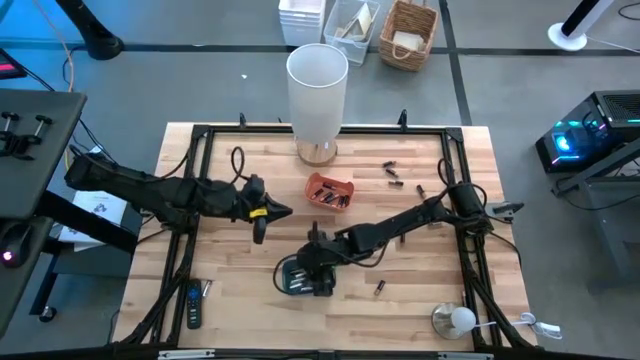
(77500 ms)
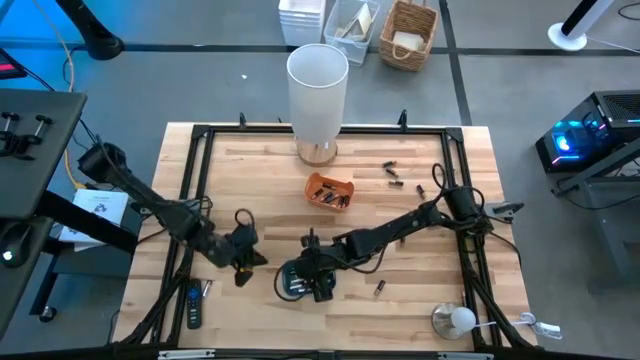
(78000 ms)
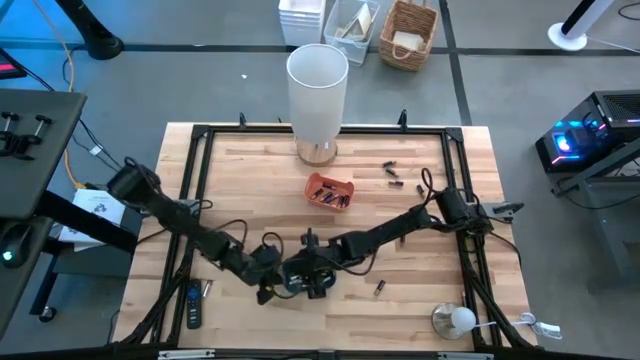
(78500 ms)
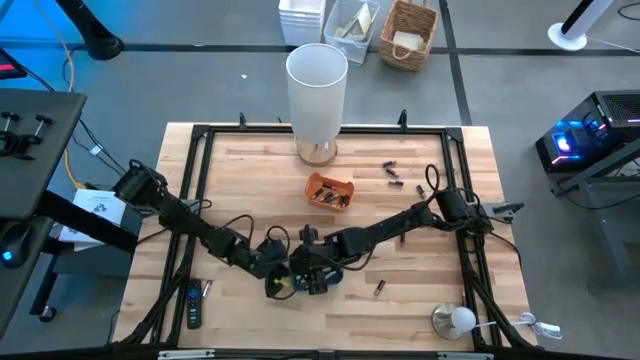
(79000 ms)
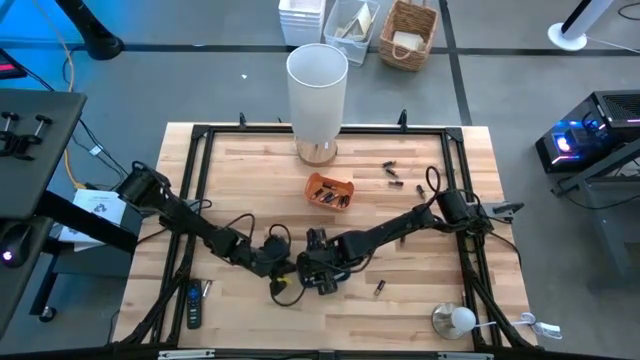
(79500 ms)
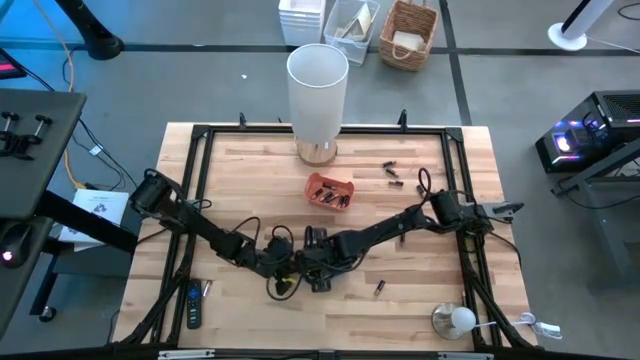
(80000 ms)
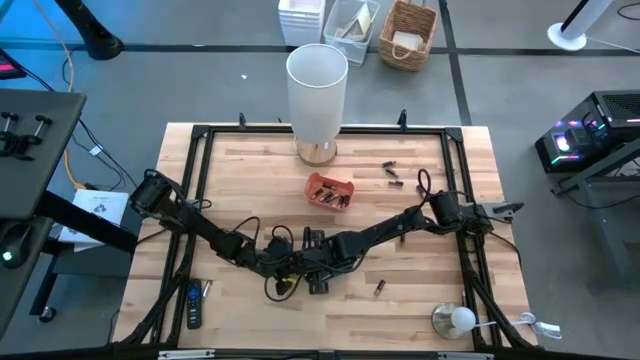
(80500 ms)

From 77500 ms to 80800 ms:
Task: Sort batteries
Remove the black battery from the blue bin

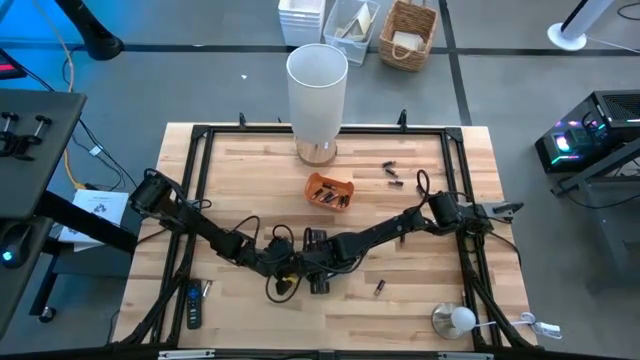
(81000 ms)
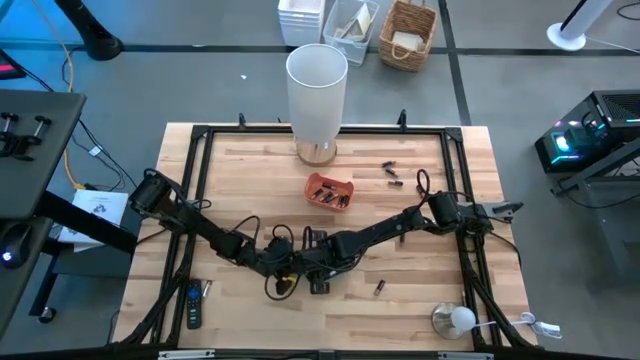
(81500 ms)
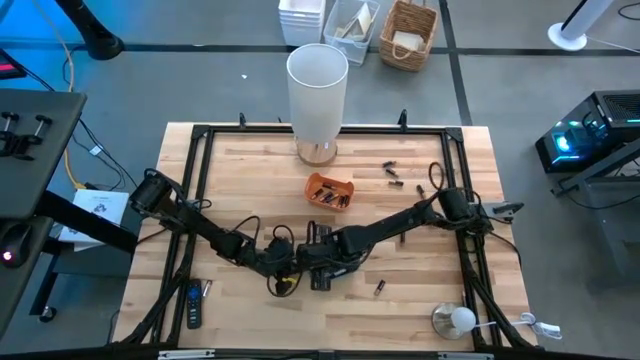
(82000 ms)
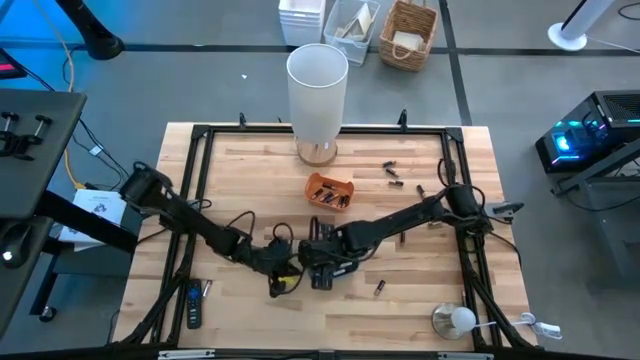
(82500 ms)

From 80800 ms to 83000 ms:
Remove the black battery from the blue bin

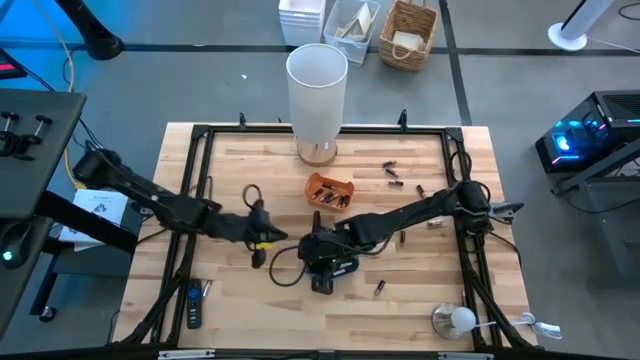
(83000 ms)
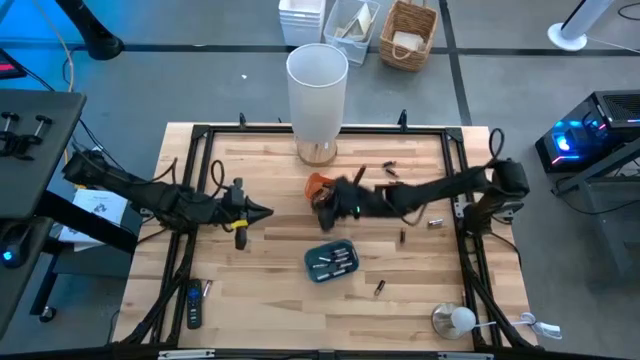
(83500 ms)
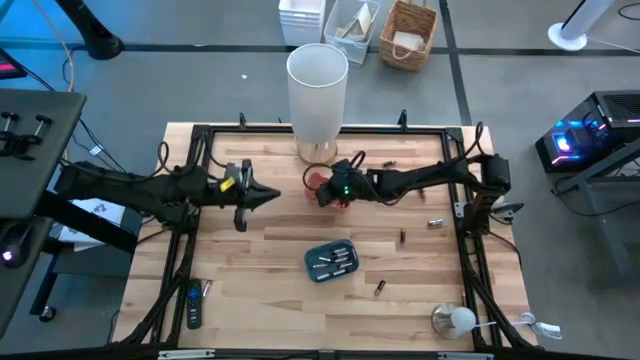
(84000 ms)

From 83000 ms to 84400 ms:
Put the black battery into the orange bin

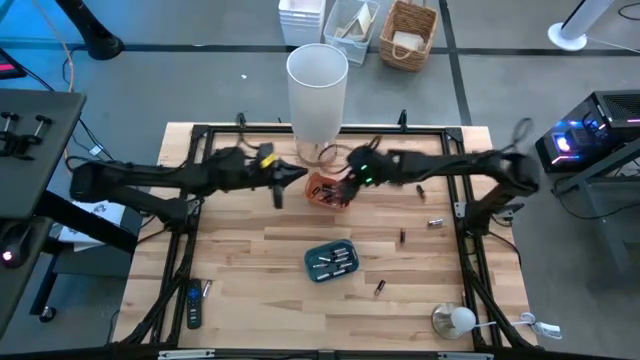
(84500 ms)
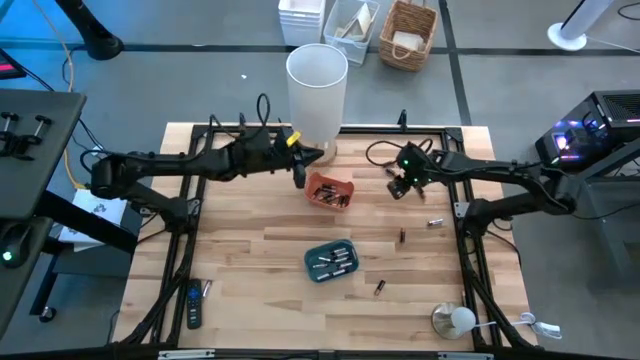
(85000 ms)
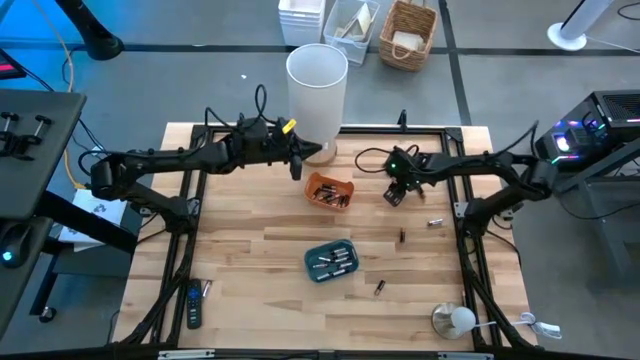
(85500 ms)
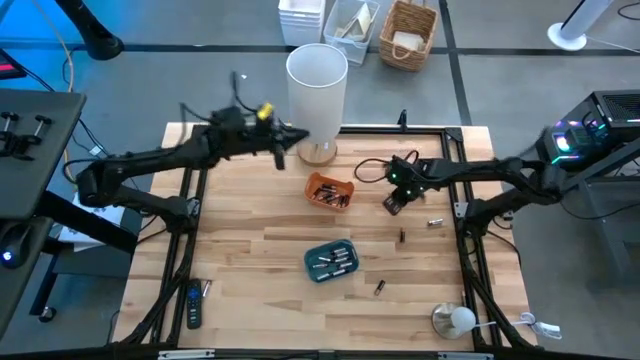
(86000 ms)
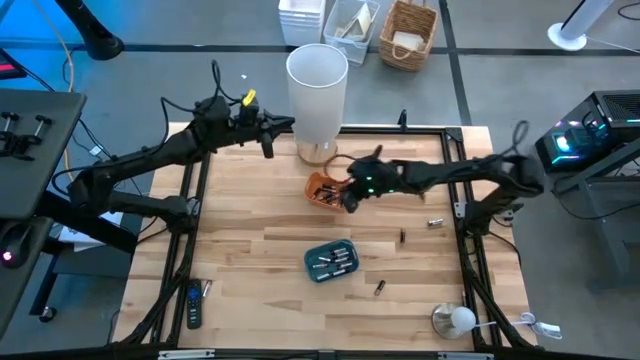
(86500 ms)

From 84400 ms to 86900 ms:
Put the black battery into the orange bin

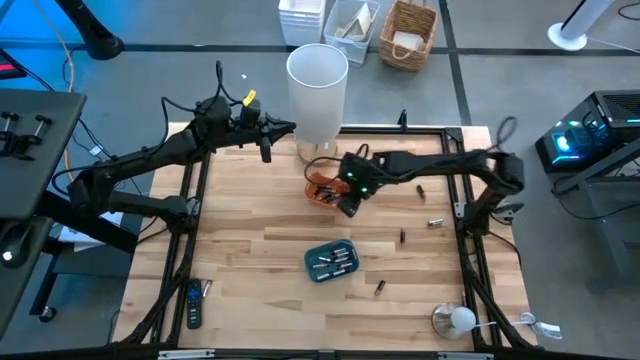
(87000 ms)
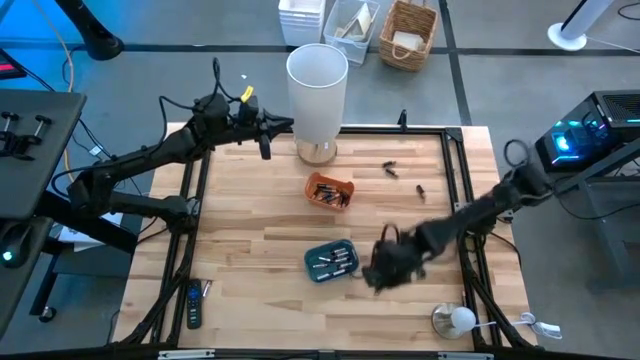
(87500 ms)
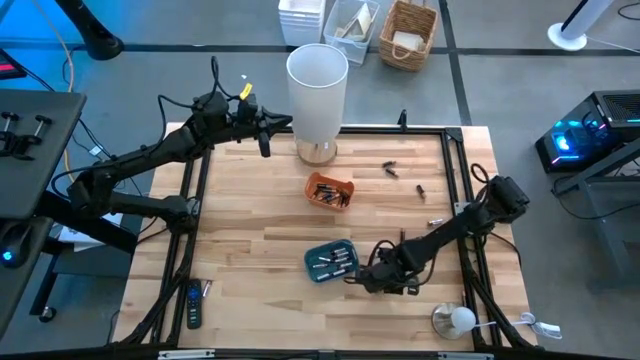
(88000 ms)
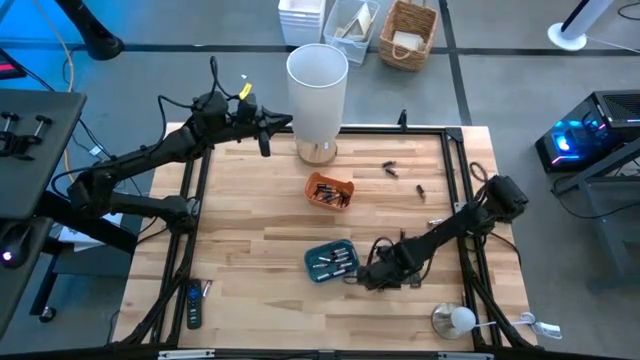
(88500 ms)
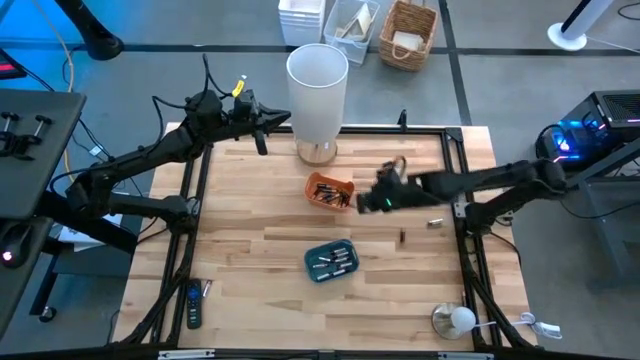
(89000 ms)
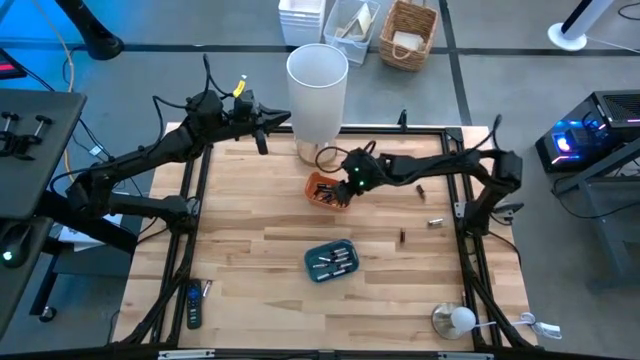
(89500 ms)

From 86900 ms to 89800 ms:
Put the black battery into the orange bin

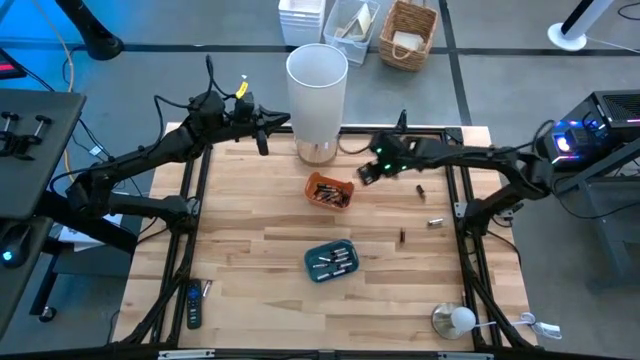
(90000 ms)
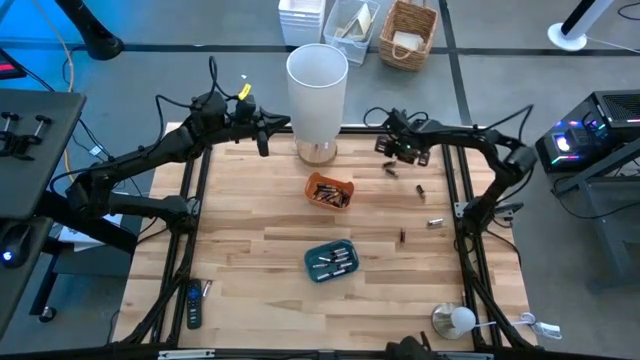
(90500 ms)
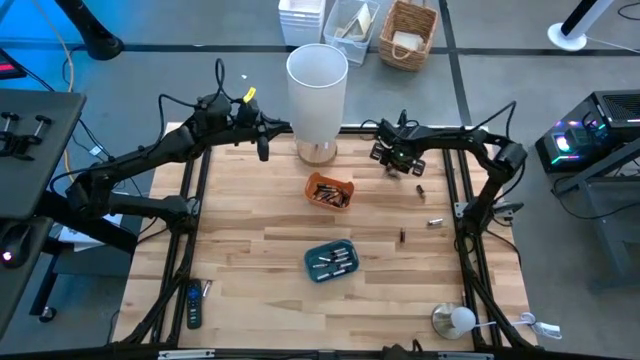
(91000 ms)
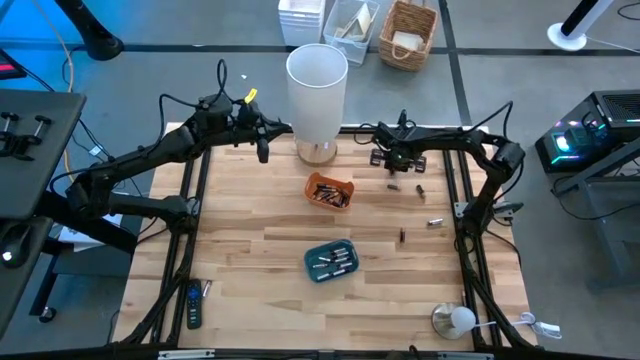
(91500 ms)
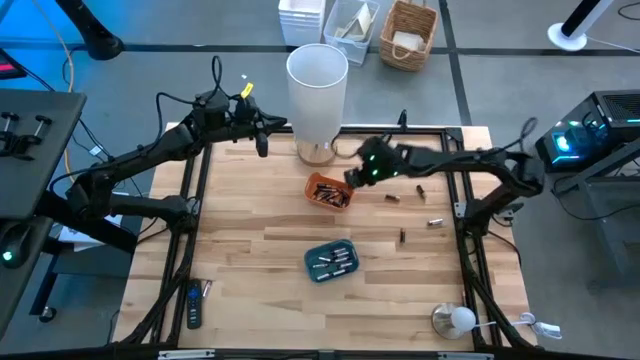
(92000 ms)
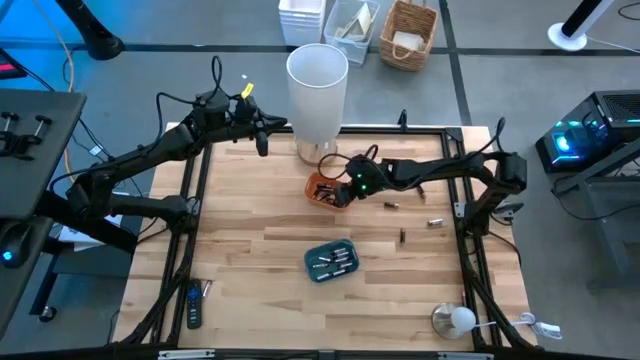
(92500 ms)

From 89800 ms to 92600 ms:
Put the black battery into the orange bin

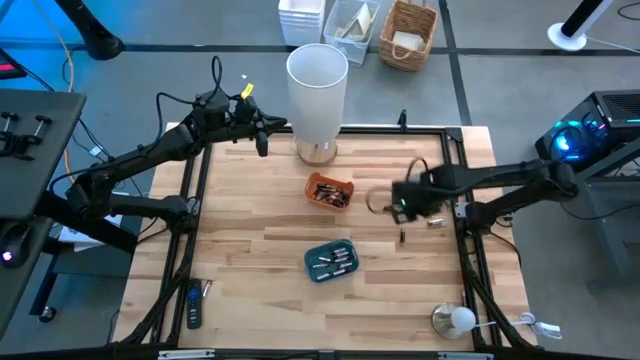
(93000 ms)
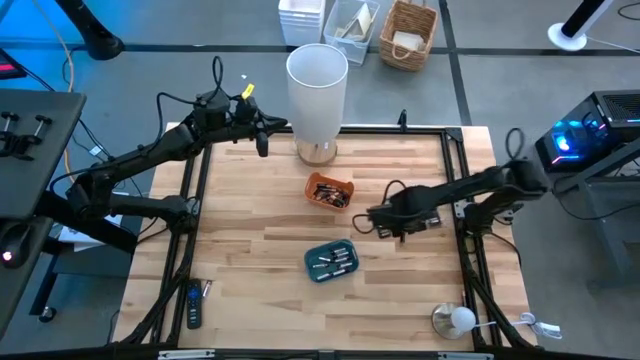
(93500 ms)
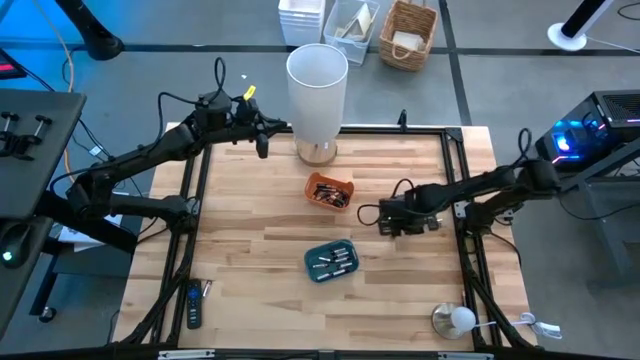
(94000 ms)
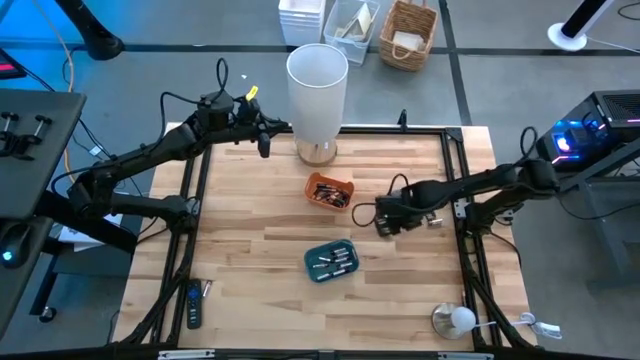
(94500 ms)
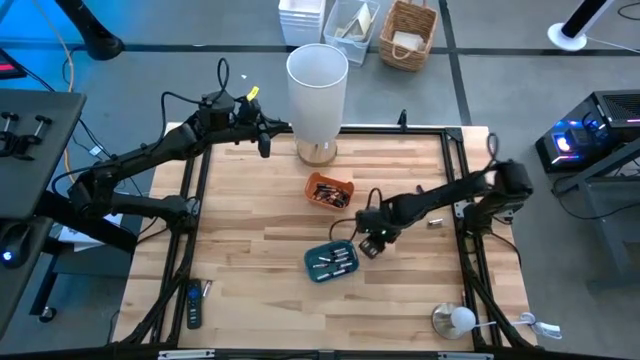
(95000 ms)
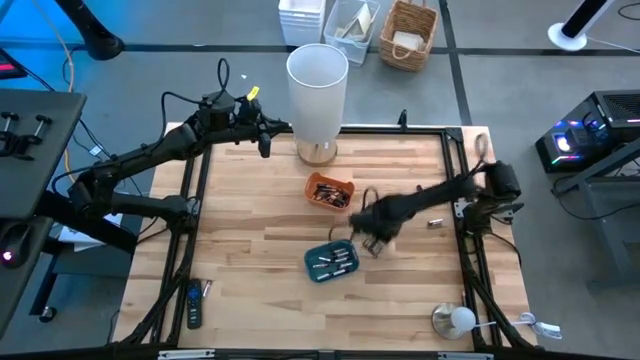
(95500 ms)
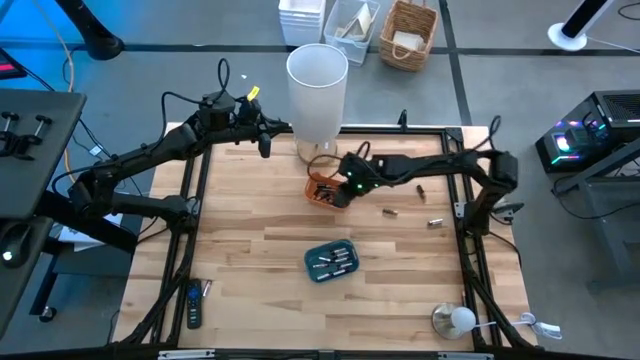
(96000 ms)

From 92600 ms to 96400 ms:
Put the black battery into the orange bin

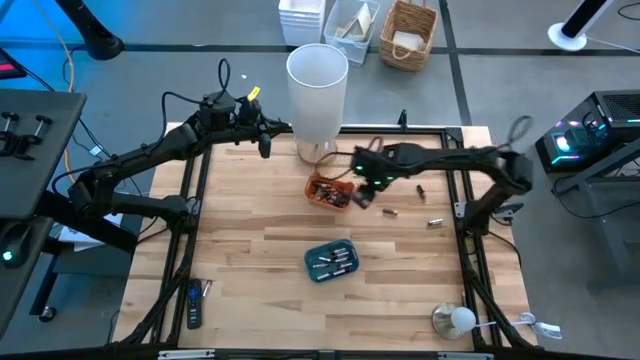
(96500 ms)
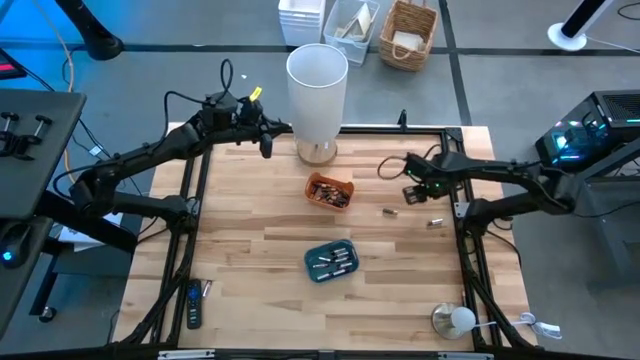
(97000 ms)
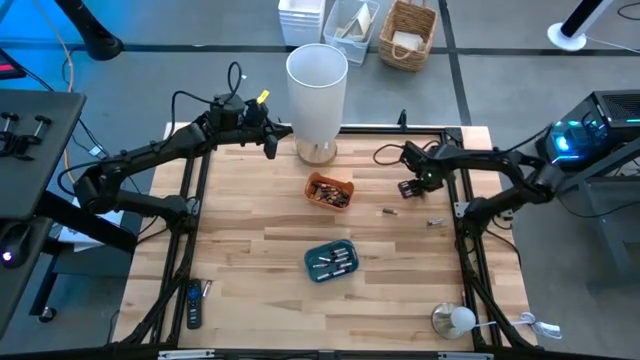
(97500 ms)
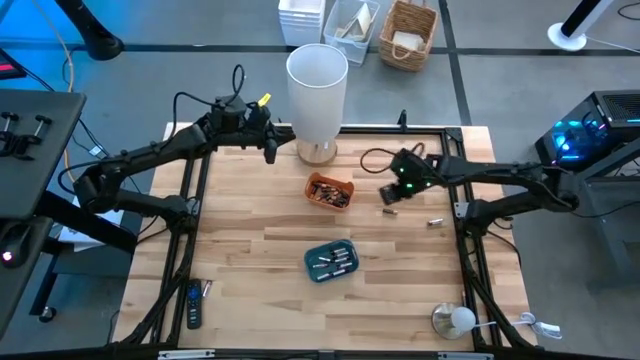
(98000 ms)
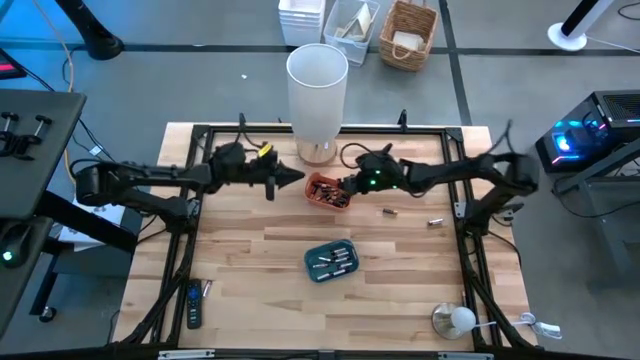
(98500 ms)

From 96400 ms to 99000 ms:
Put the black battery into the orange bin

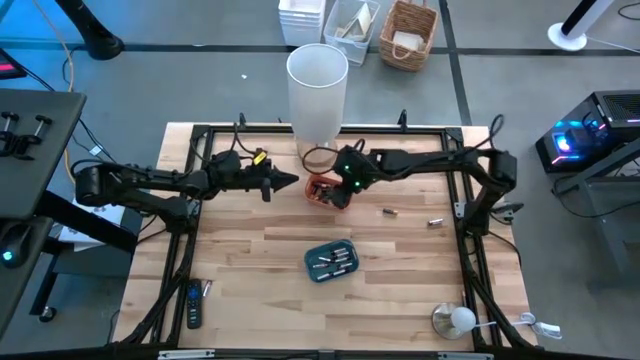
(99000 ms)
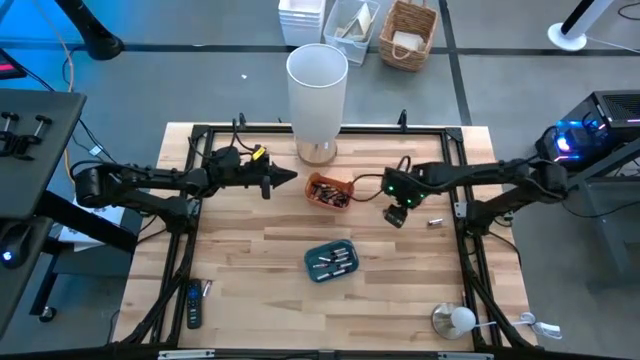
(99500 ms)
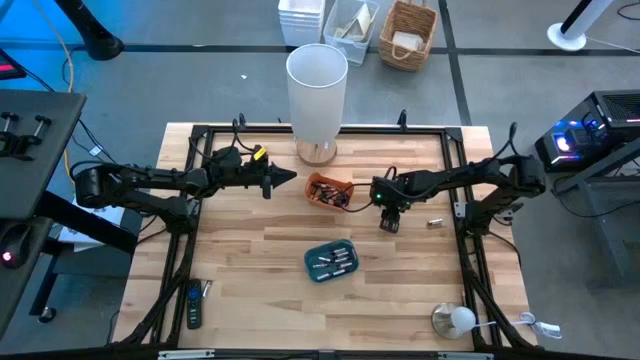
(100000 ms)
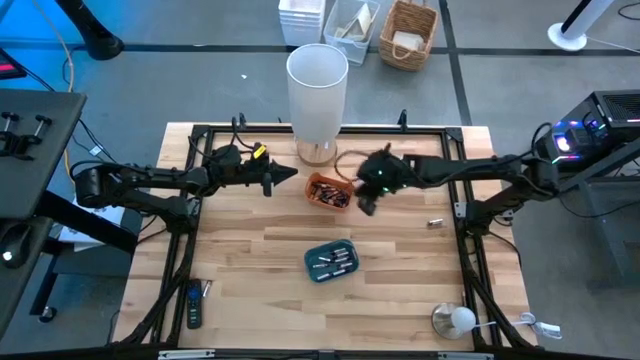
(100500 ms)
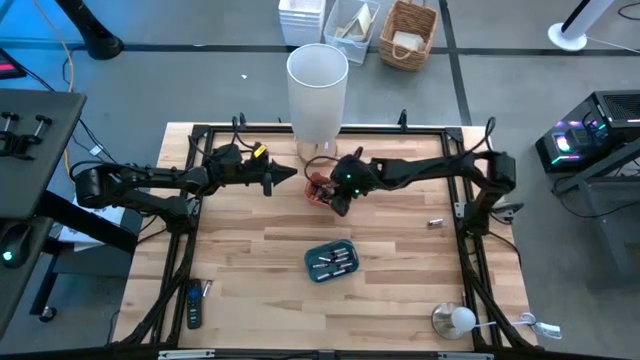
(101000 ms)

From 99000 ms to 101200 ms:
Put the black battery into the orange bin
